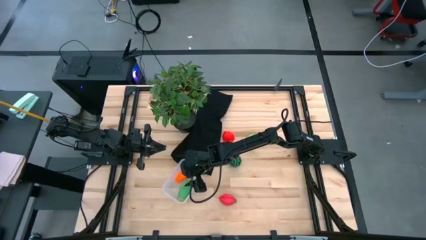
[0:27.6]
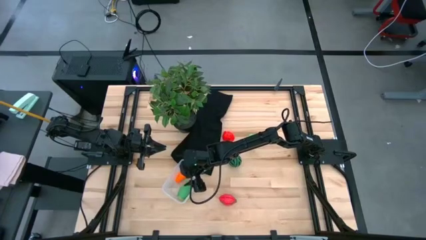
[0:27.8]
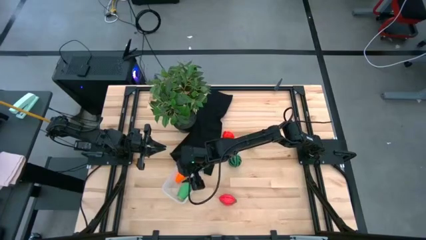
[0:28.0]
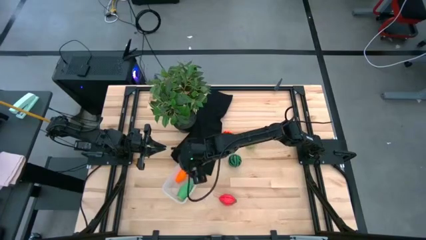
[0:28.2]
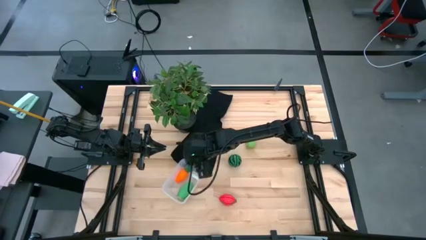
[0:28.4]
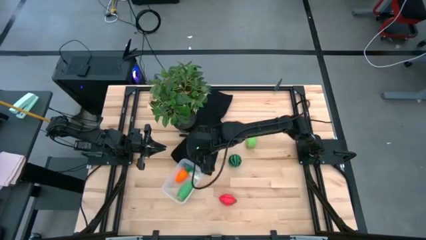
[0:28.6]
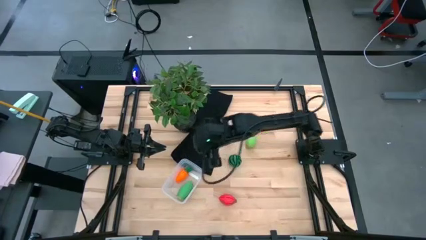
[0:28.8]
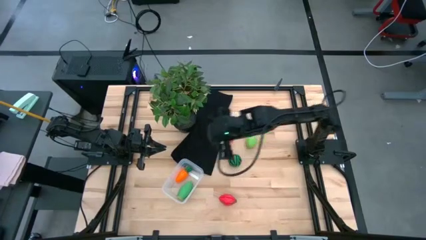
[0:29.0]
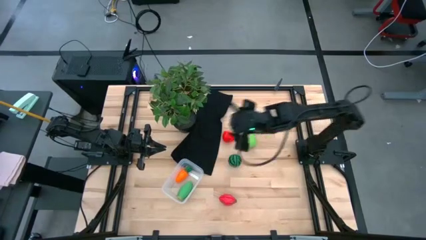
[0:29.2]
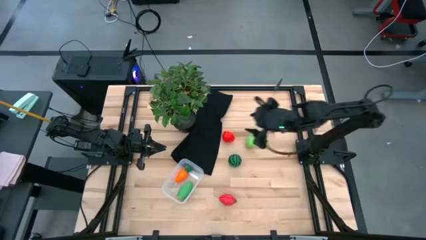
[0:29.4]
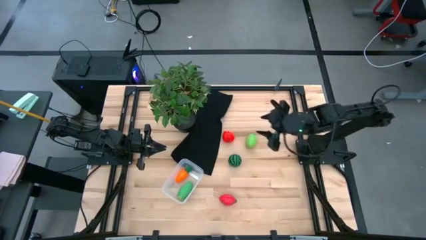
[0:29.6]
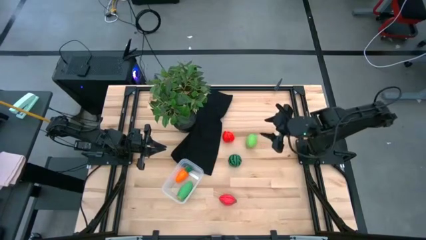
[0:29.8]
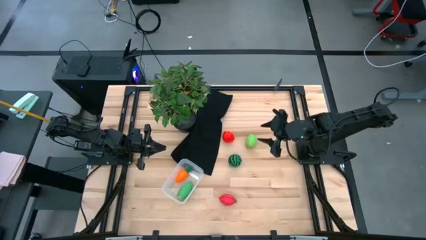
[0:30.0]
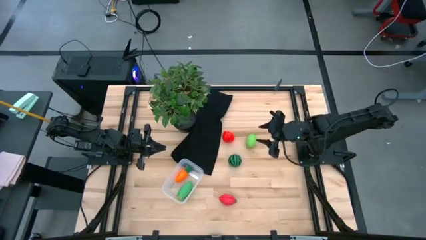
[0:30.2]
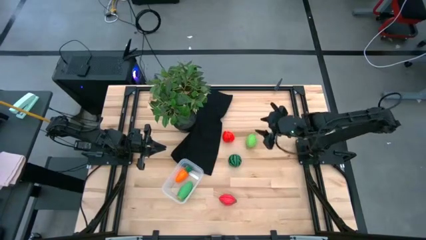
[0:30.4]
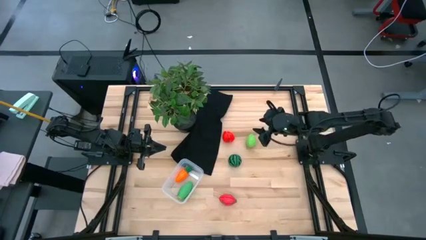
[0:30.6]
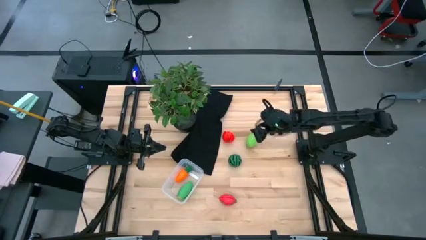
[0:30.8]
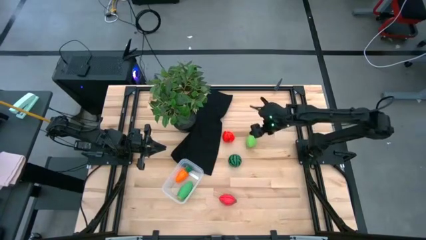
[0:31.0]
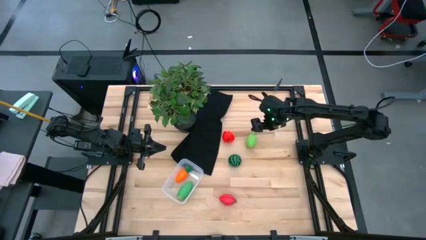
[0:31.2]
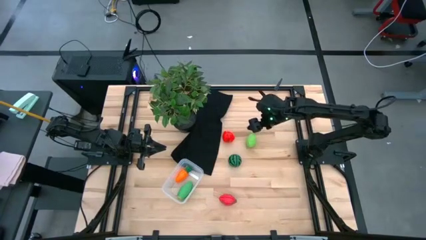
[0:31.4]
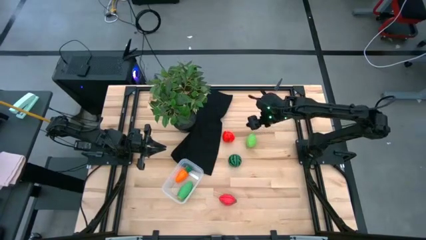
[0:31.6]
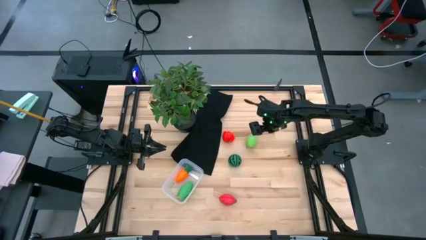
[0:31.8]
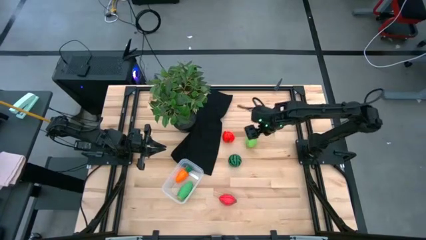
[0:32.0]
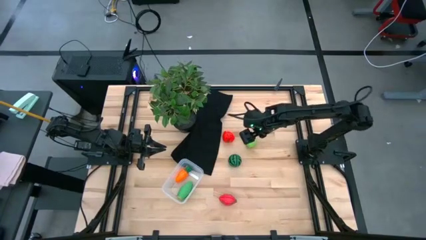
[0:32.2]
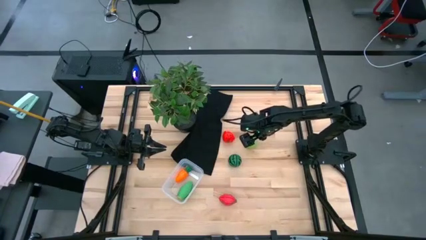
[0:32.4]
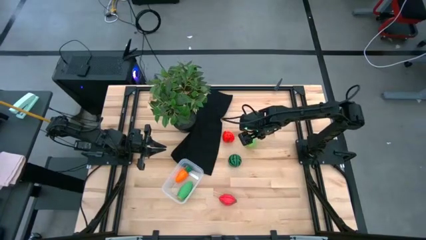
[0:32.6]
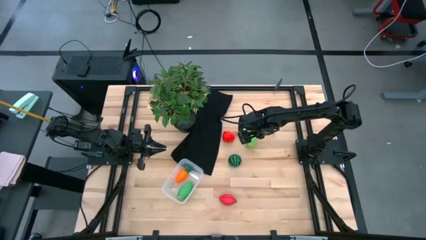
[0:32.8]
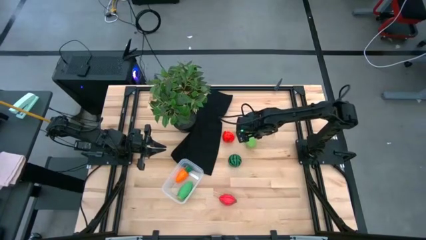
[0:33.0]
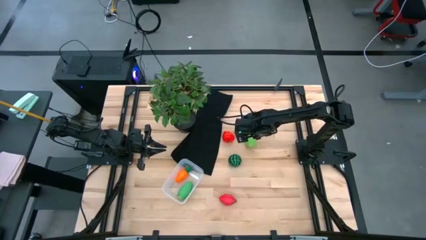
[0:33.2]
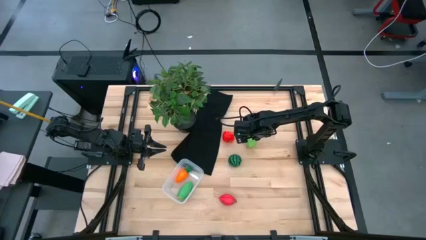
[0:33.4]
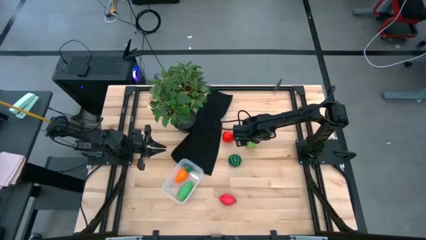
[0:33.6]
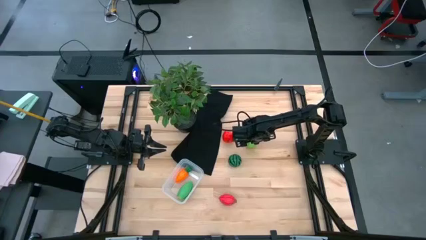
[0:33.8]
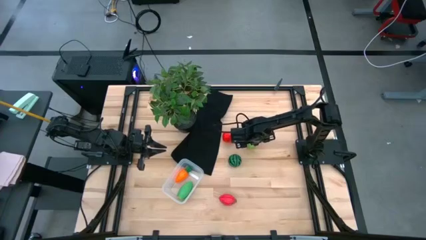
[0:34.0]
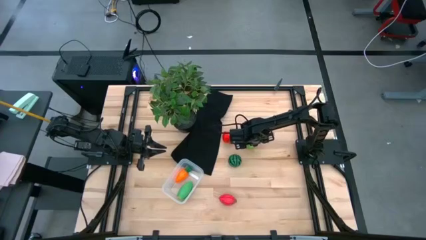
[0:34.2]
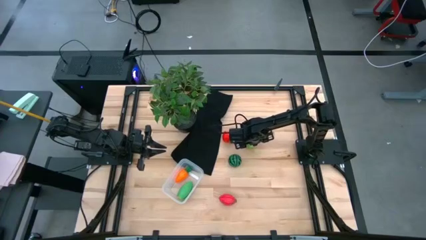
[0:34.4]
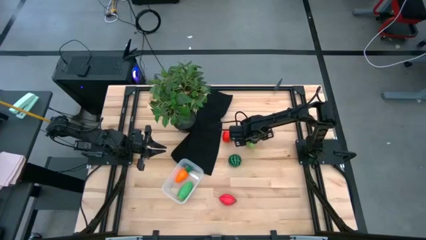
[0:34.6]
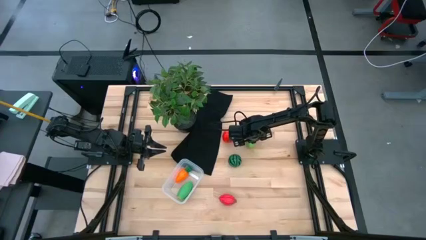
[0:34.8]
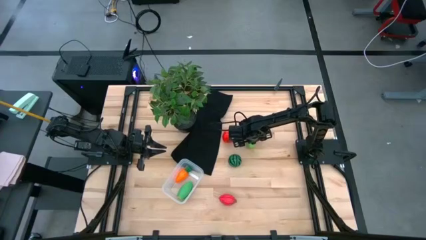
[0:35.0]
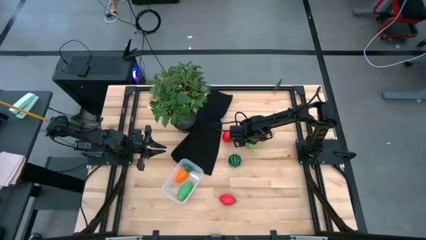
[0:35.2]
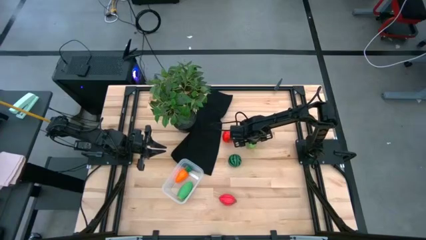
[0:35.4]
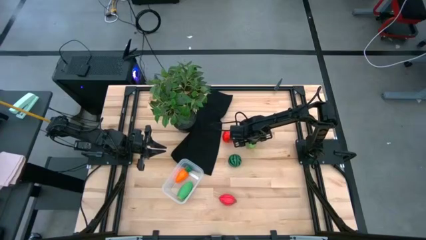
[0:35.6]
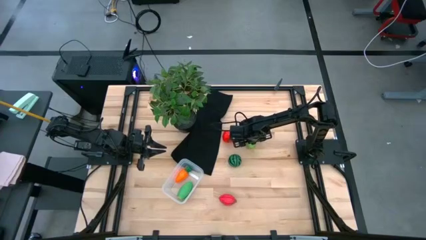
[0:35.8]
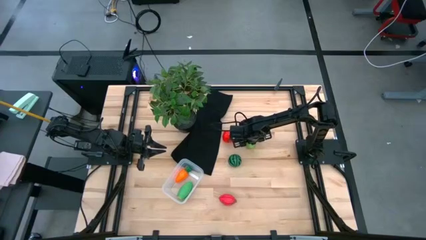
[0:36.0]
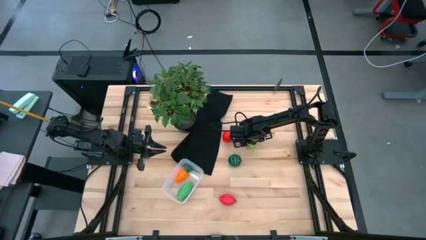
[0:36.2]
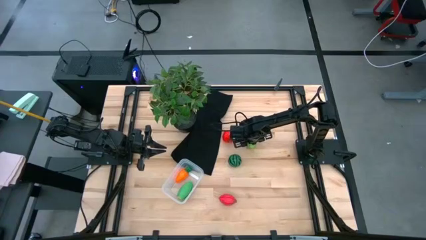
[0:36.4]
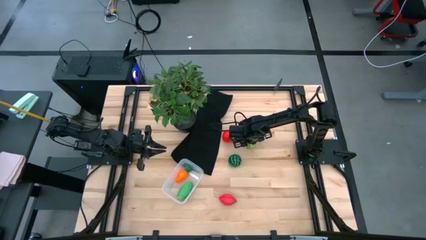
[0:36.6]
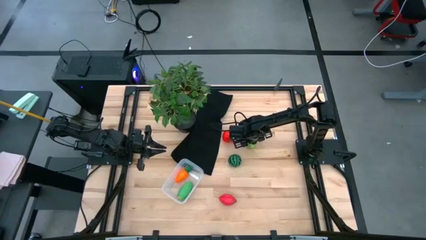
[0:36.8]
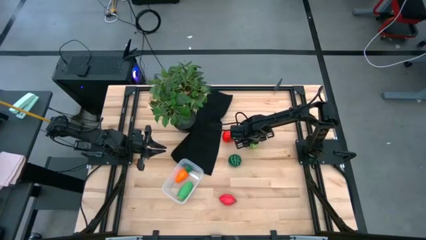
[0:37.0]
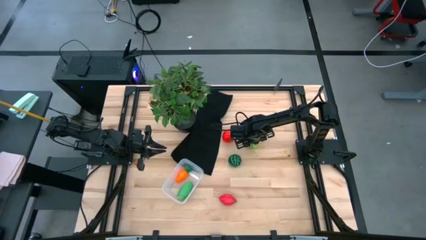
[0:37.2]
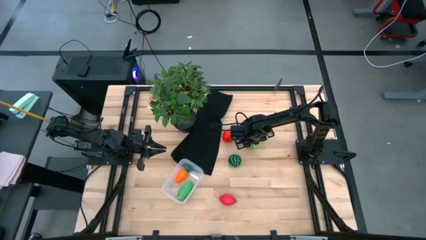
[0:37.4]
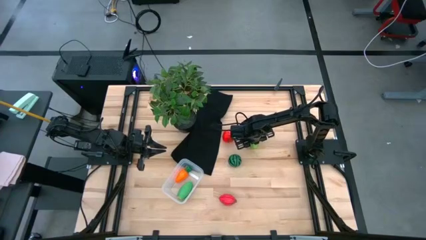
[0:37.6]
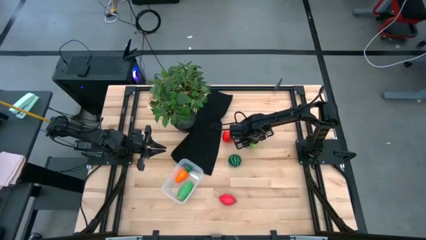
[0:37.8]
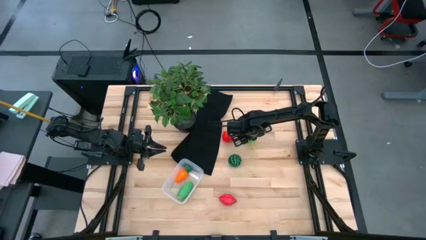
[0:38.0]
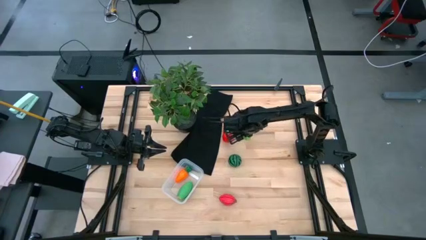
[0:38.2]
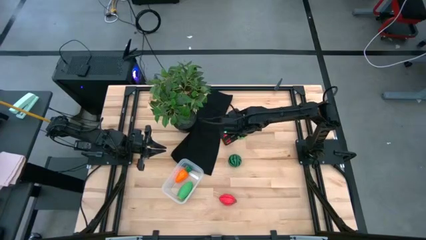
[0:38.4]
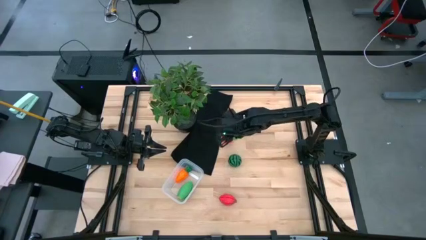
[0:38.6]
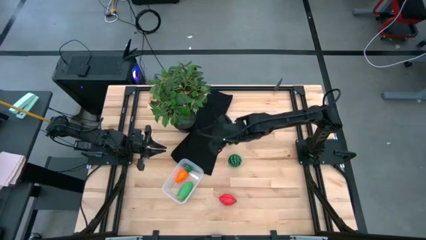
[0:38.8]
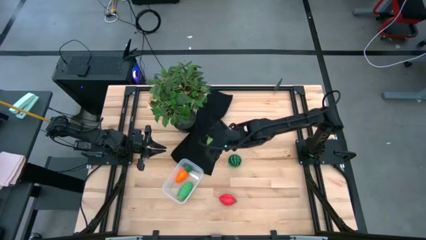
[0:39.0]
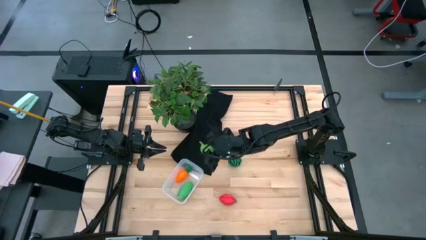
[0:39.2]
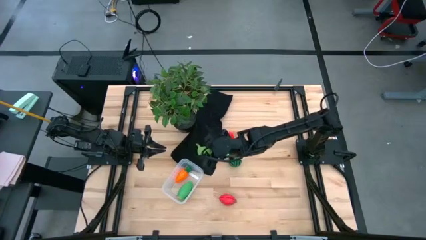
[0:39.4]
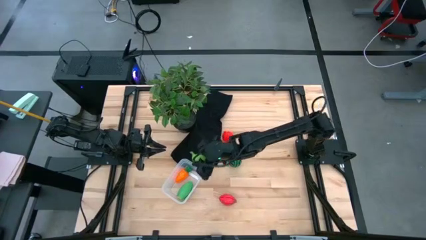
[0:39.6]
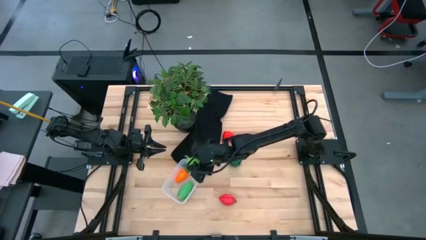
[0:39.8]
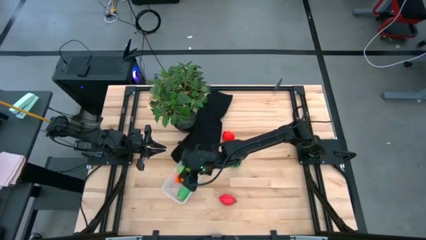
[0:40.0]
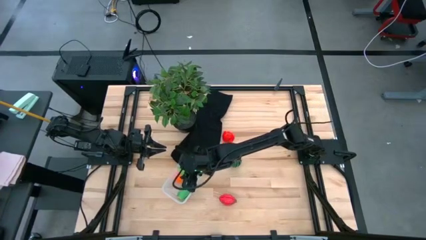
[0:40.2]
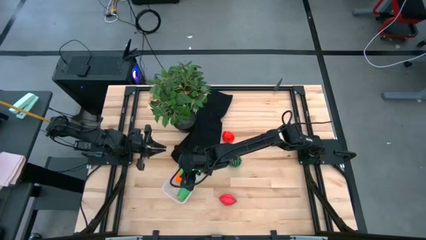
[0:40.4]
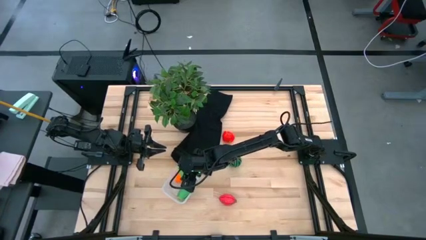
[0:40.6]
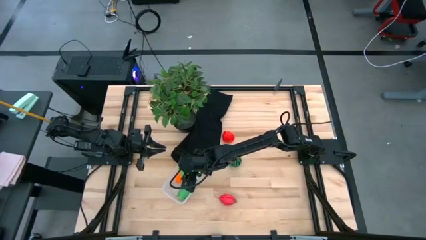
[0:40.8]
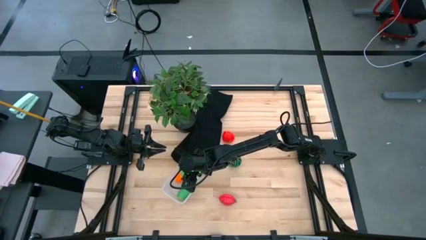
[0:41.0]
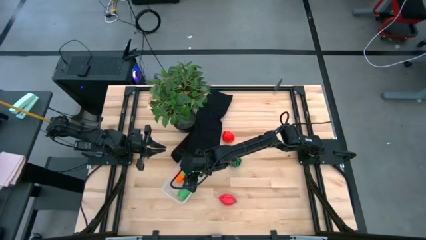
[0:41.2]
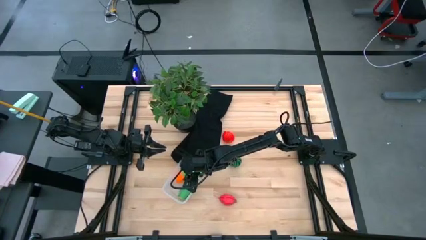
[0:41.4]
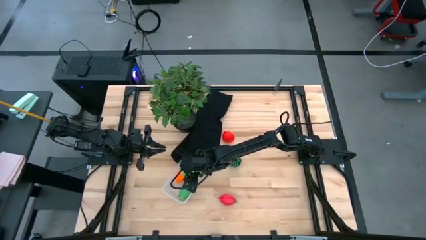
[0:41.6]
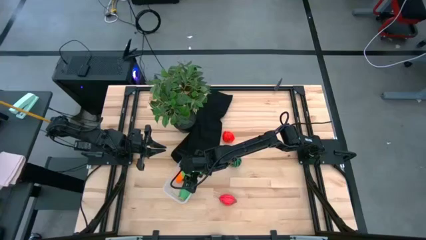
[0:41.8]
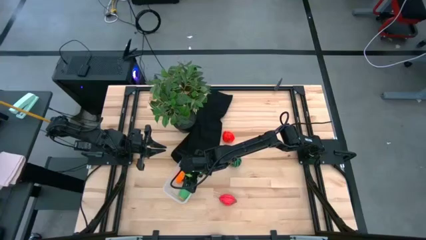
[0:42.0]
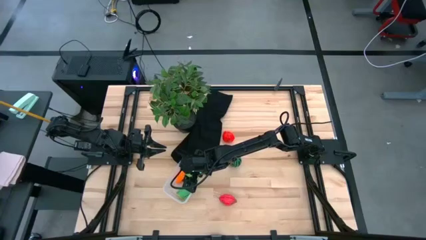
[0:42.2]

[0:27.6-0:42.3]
Task: Pick and placing Produce into tupperware
Put the light green cabbage into the transparent bin
